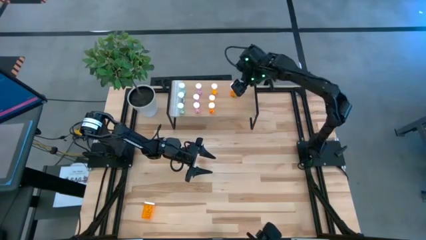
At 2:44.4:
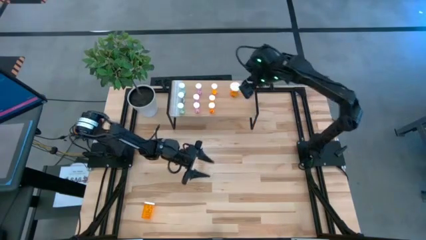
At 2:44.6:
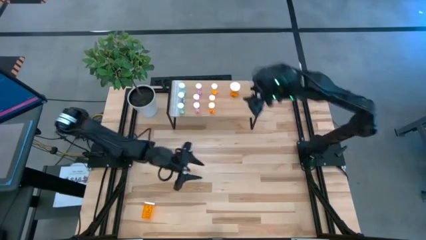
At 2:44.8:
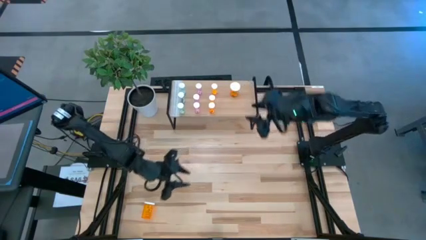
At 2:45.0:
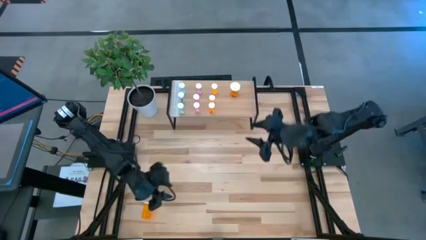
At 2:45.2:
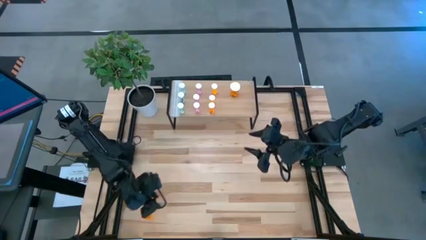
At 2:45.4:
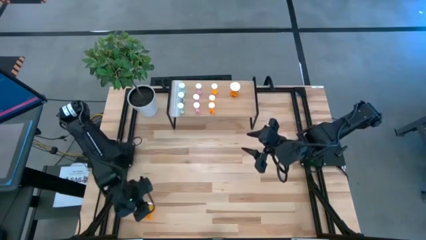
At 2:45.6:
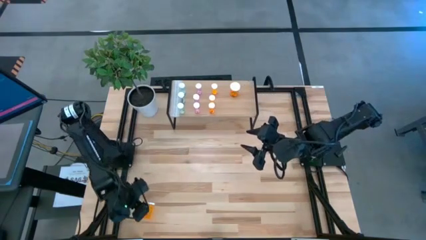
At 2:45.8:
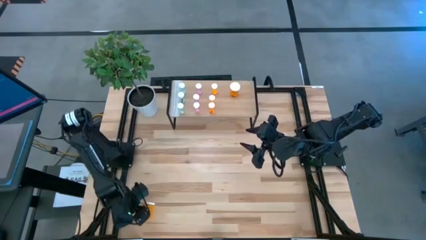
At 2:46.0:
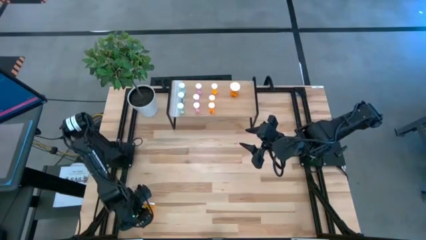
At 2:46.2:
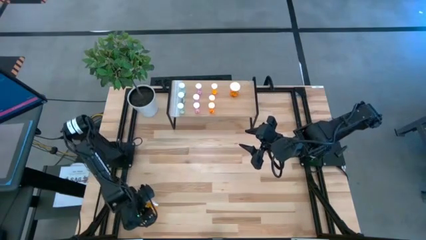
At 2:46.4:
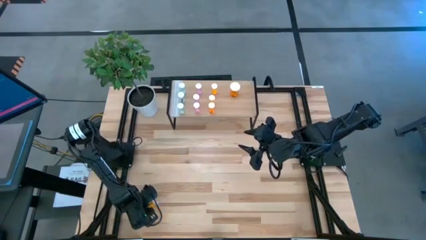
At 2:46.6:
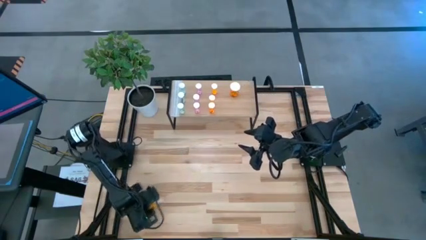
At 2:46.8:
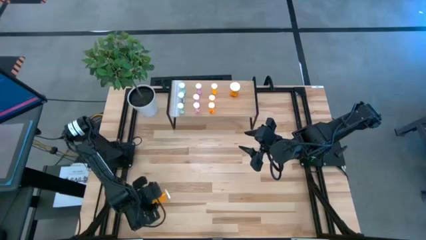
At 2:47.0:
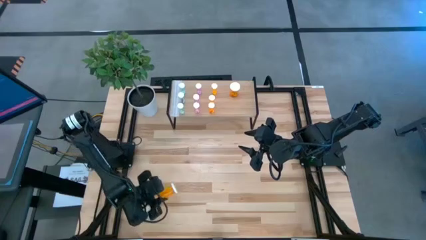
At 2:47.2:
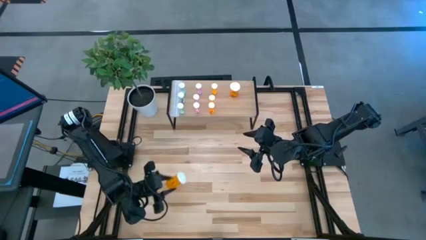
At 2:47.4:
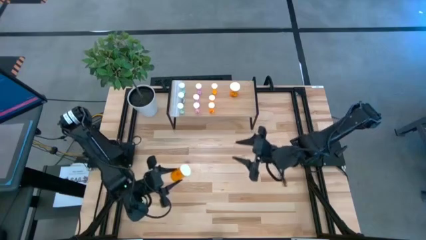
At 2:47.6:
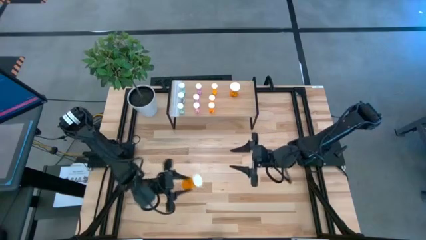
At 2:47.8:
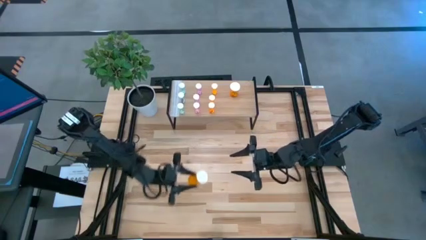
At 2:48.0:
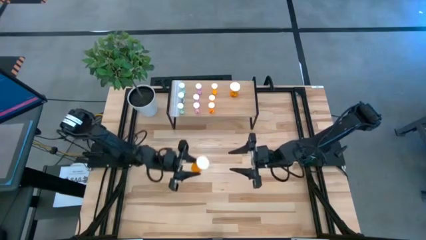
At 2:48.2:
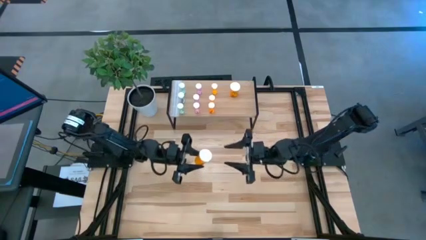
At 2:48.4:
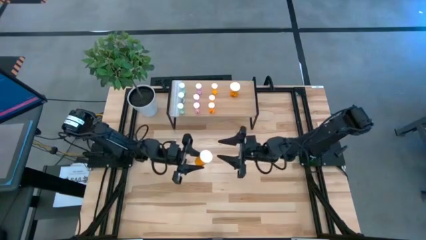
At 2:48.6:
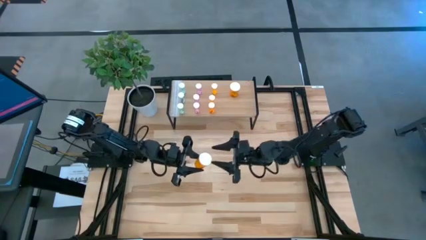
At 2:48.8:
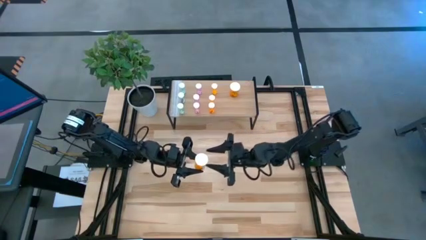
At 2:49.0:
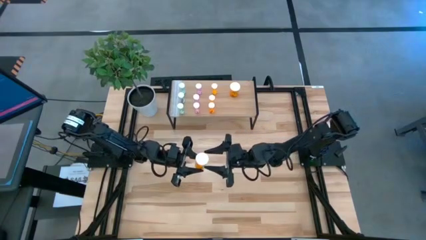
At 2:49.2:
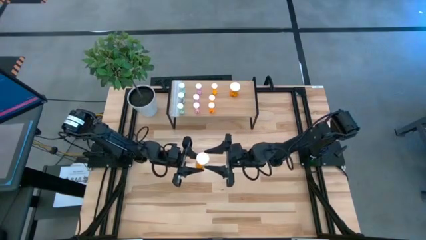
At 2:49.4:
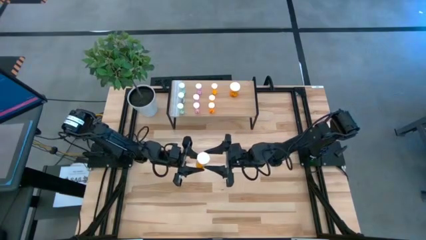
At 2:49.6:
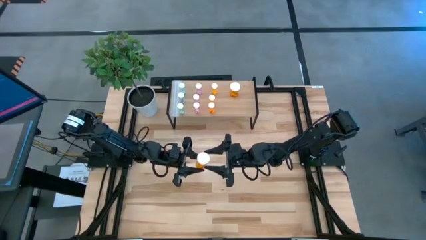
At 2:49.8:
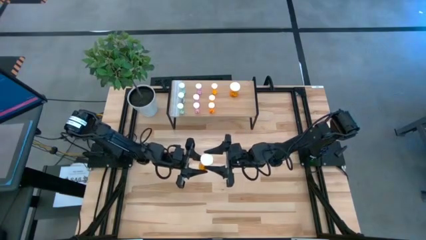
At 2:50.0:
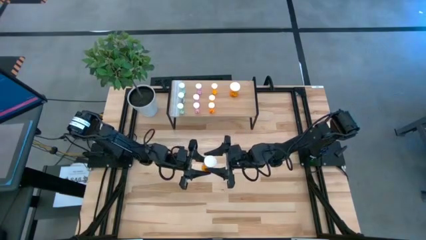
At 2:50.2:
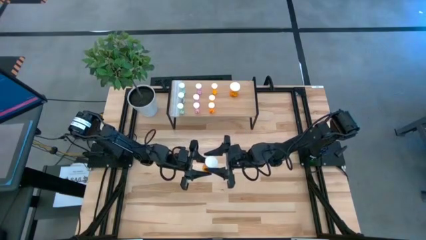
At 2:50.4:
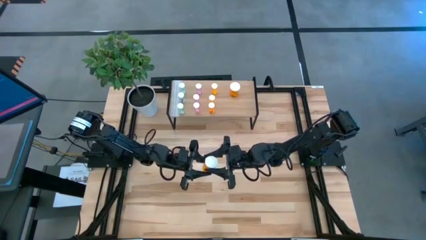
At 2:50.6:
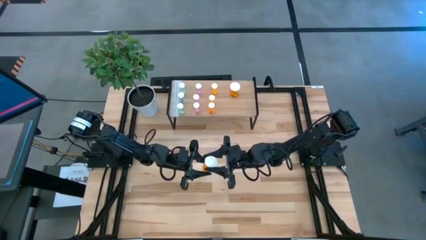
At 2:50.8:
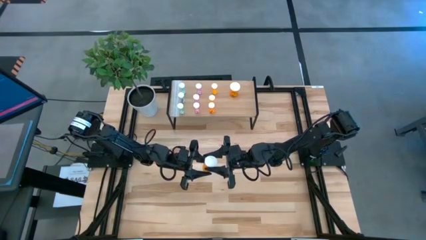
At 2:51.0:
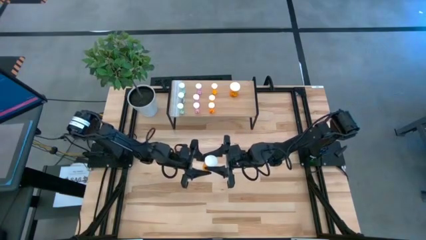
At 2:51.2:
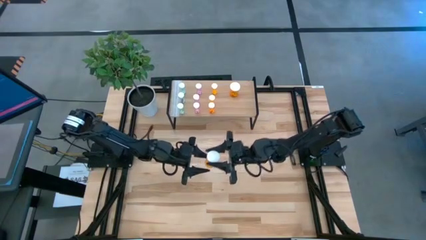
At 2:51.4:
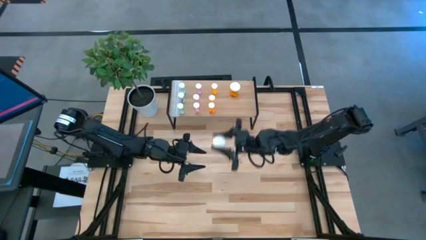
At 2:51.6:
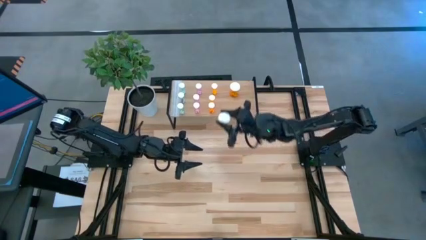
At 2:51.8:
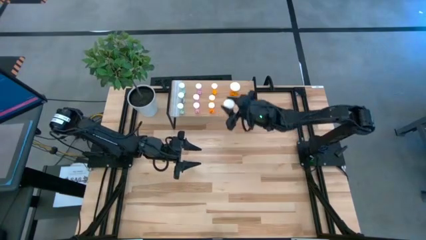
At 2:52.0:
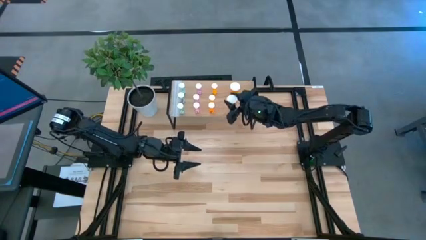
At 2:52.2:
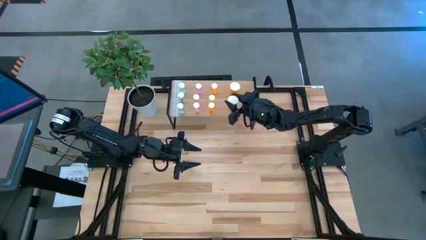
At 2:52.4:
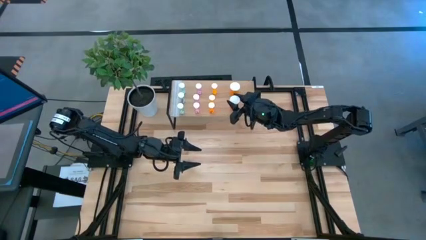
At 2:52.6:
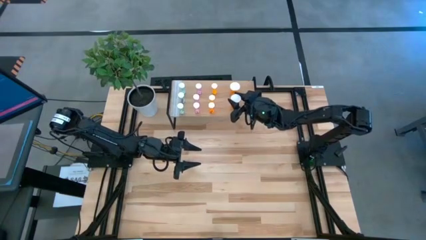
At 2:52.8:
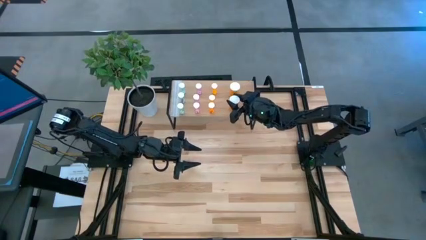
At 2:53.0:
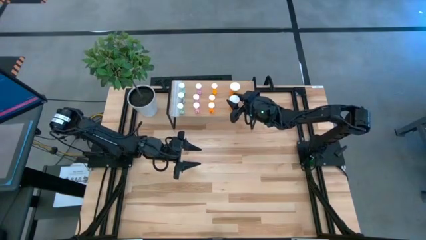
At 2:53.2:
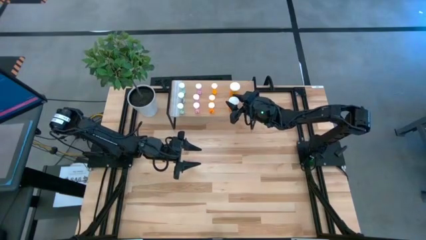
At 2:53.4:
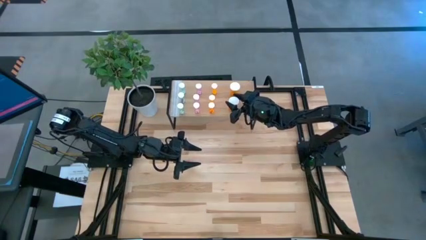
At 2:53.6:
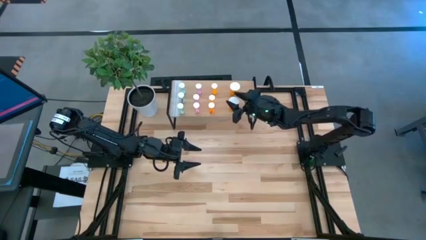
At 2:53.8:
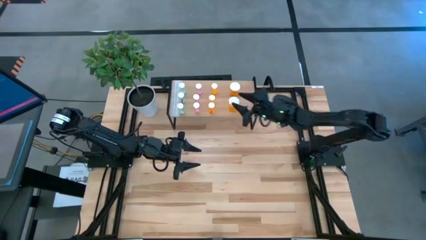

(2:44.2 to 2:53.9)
Task: Pick and place medicine bottles onto shelf by color
Put the large orange pill bottle on the shelf aligned with the other large orange pill bottle

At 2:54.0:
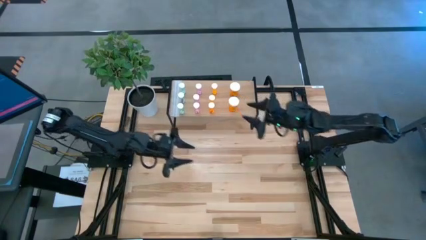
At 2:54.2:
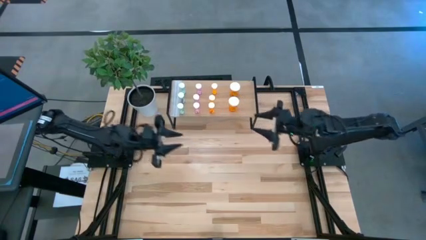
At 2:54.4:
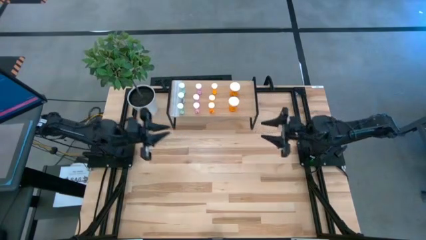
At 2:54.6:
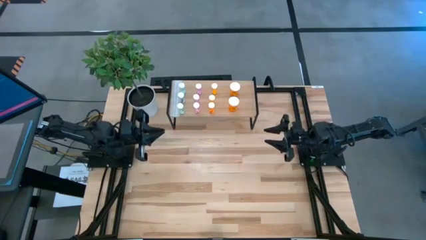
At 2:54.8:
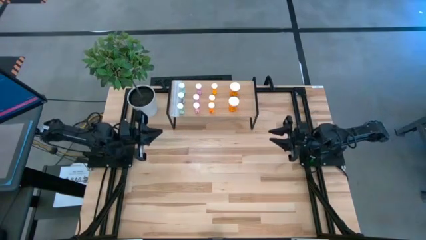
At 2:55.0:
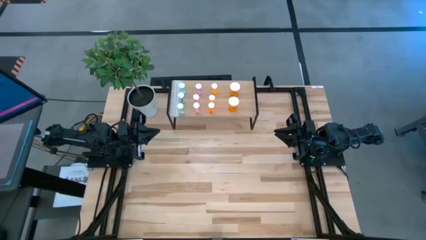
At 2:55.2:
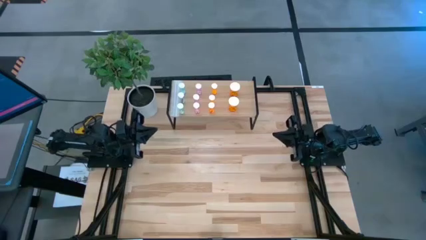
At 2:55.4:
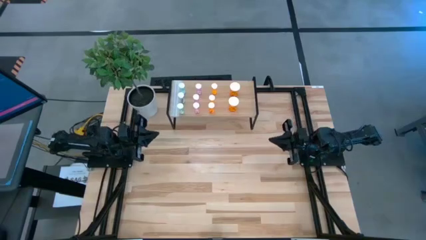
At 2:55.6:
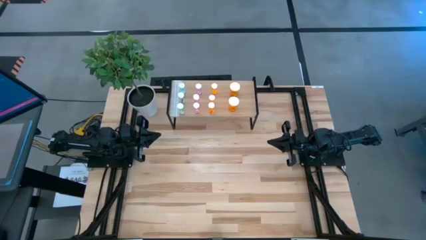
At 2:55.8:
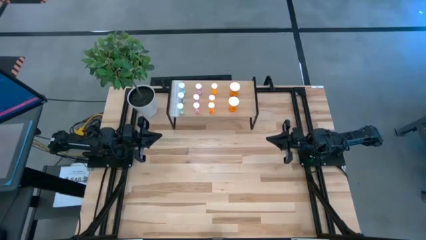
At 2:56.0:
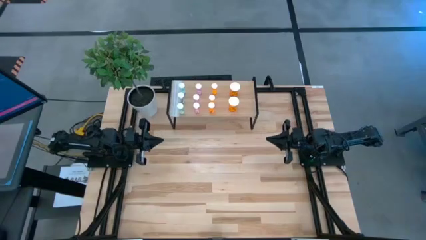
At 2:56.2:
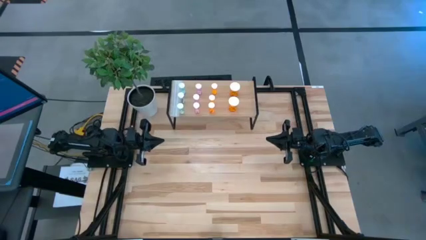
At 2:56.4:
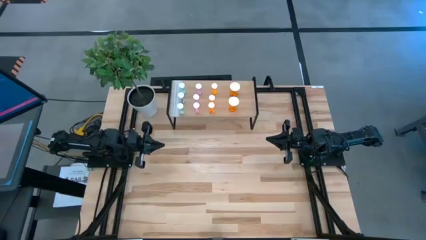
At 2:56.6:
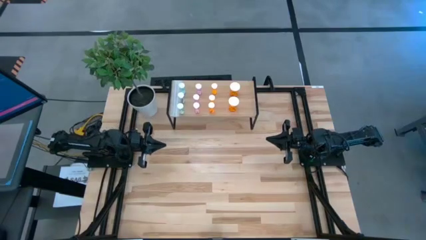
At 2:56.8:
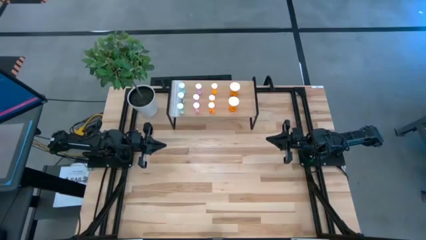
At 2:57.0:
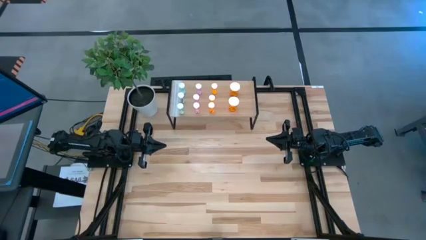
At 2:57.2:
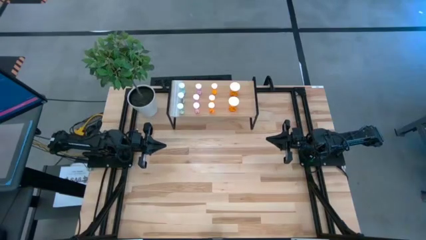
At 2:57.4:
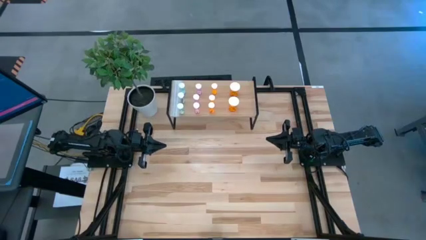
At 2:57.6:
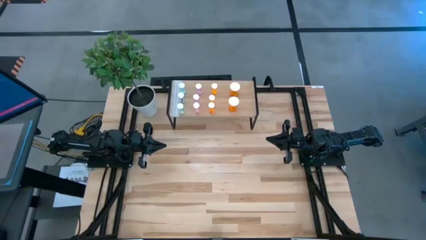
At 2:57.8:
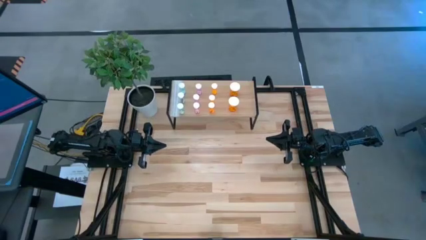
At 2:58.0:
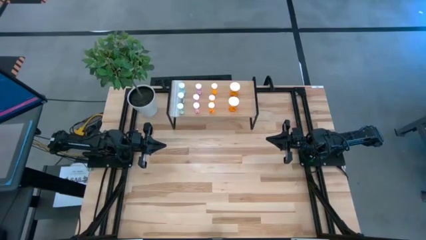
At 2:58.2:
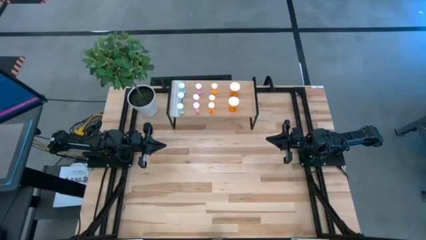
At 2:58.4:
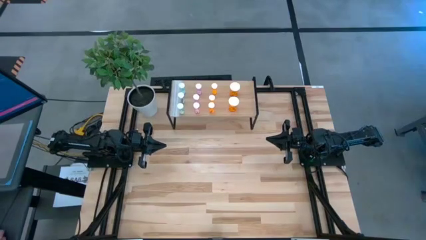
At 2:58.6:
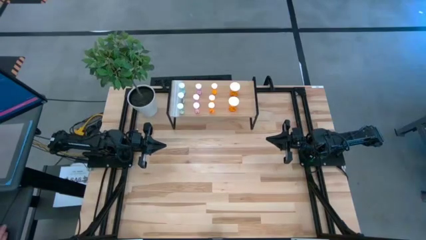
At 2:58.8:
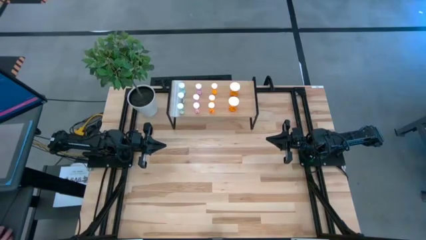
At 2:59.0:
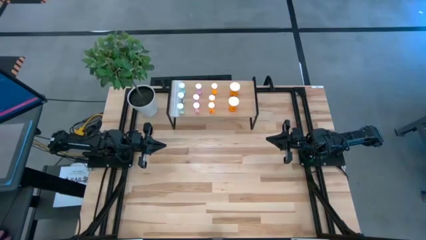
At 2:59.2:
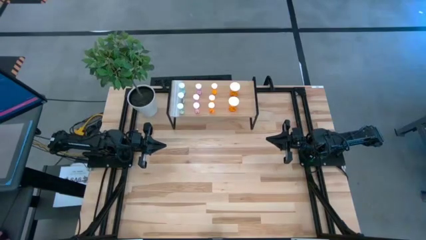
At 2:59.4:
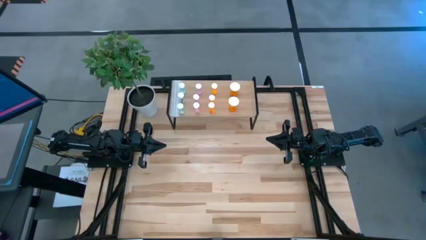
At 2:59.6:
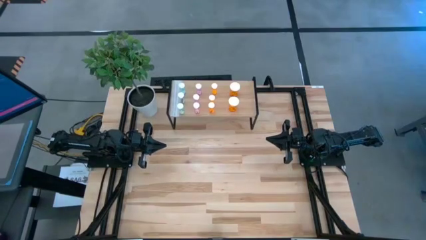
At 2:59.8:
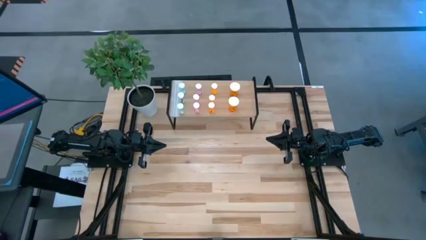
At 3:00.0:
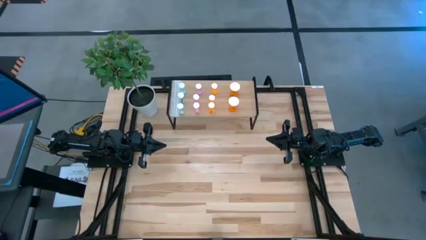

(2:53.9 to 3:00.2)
Return to Home Position
